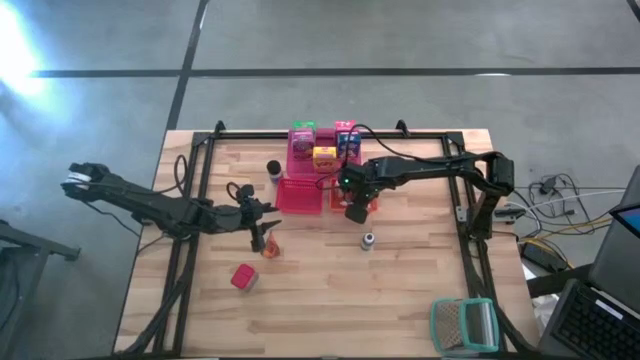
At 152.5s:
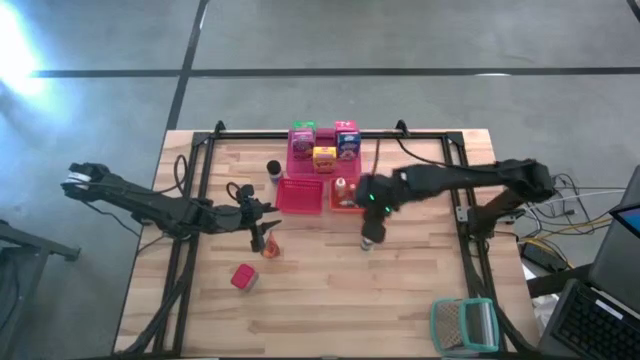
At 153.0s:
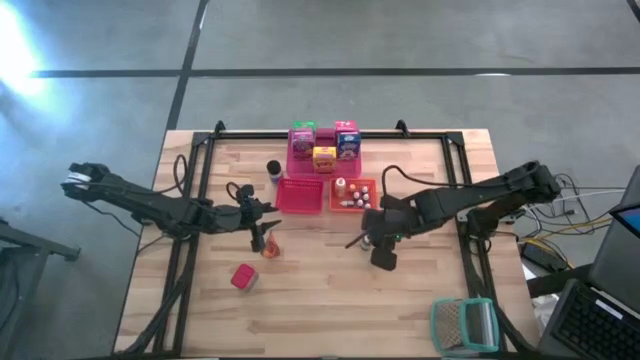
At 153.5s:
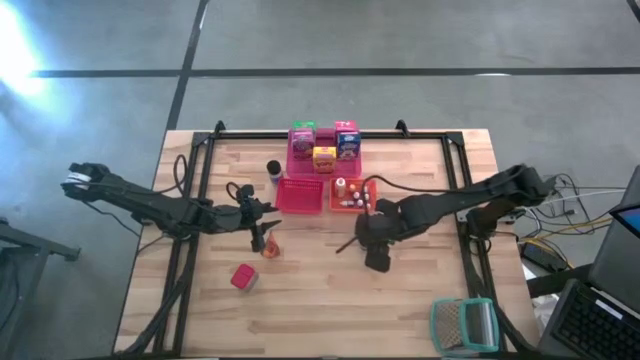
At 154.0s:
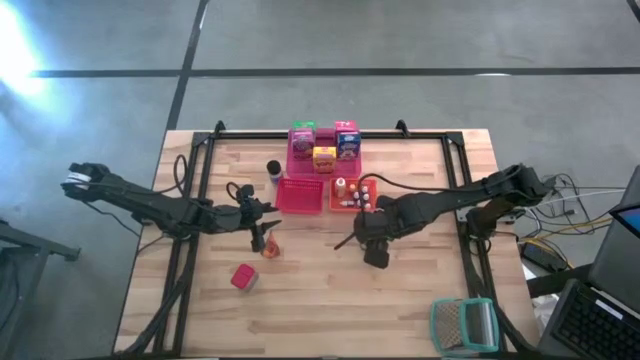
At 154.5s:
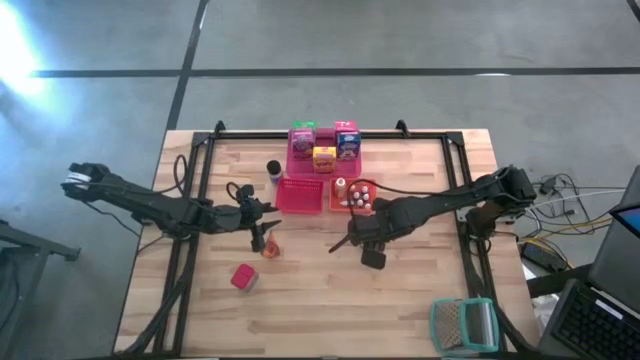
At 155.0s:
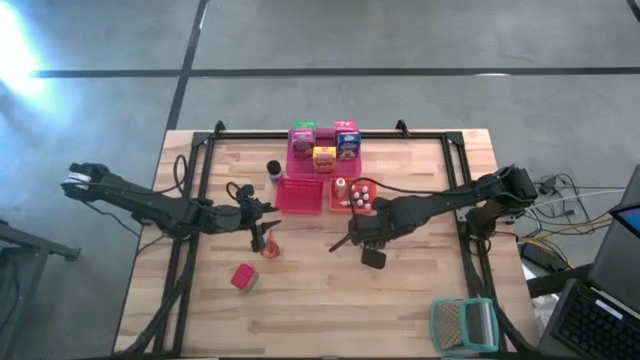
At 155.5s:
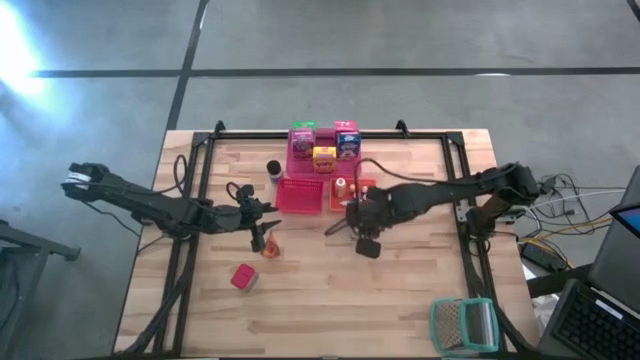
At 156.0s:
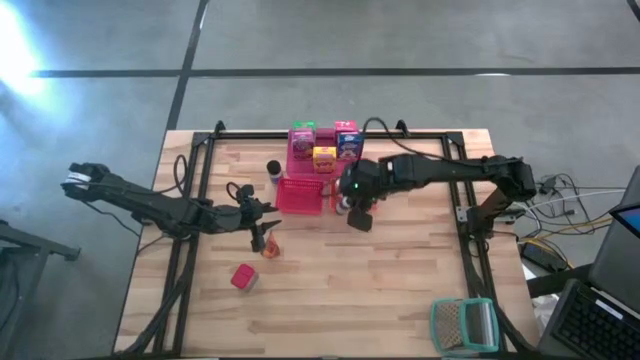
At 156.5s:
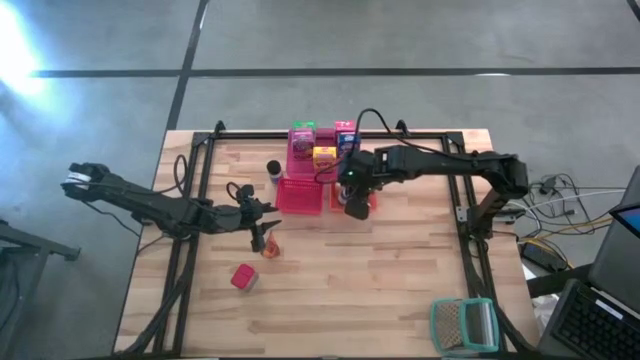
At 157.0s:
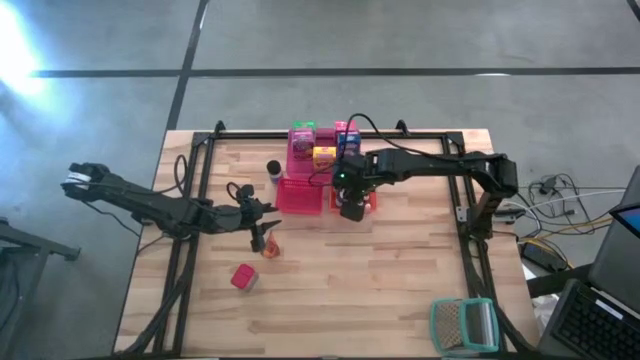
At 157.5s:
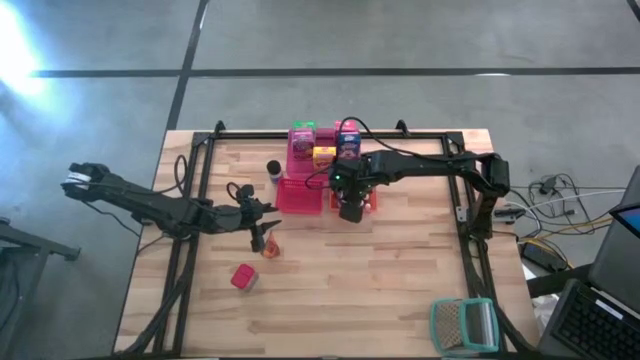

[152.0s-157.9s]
Task: Pick & Place Kitchen Items
Put the large black food coloring bottle into the orange bin

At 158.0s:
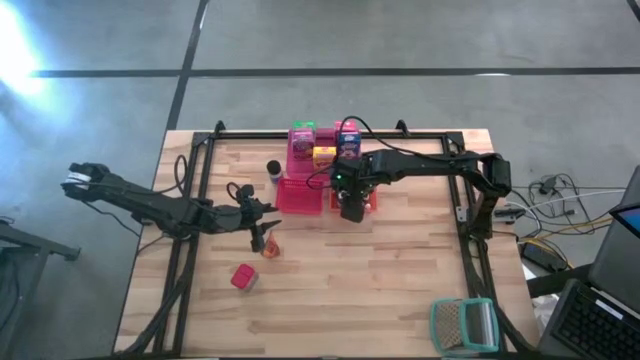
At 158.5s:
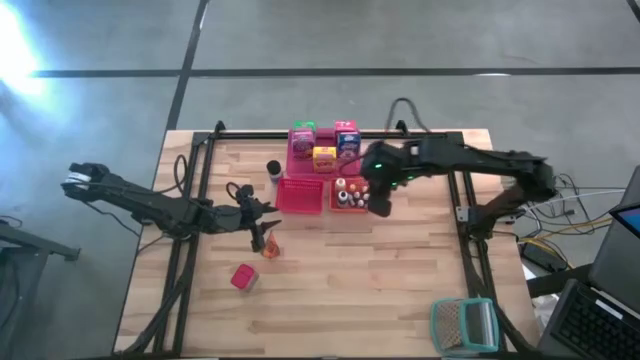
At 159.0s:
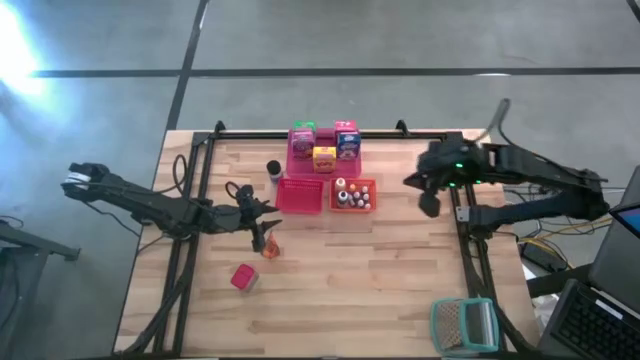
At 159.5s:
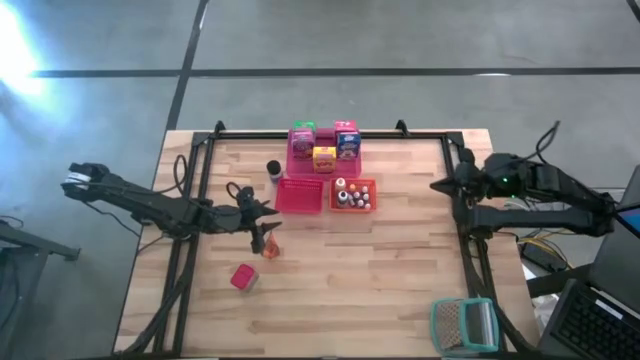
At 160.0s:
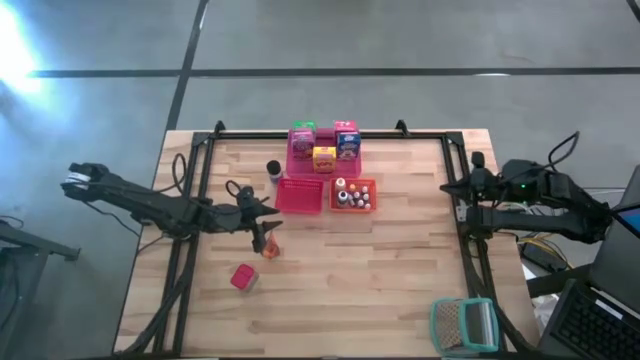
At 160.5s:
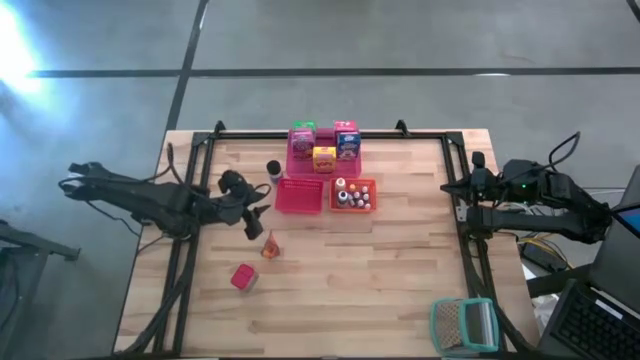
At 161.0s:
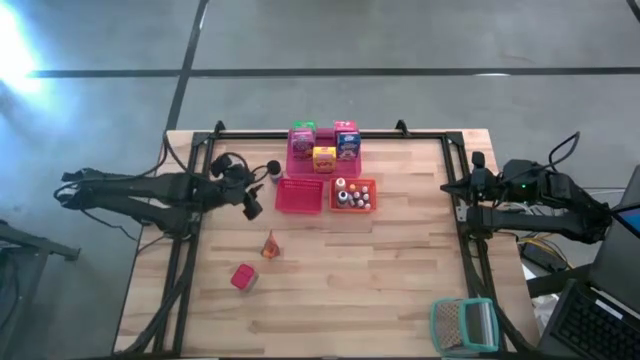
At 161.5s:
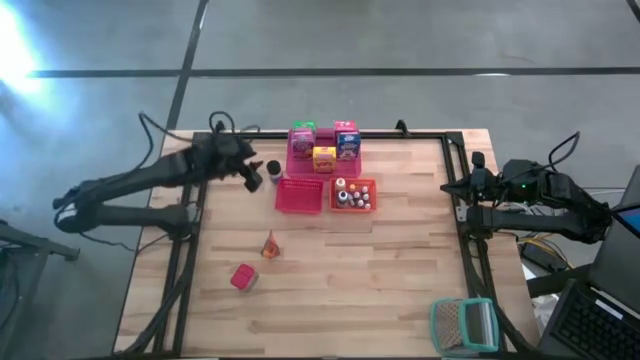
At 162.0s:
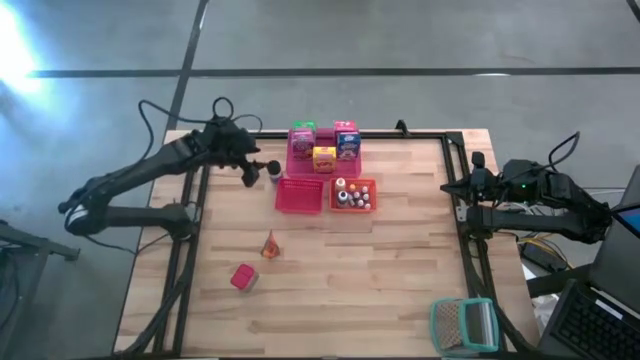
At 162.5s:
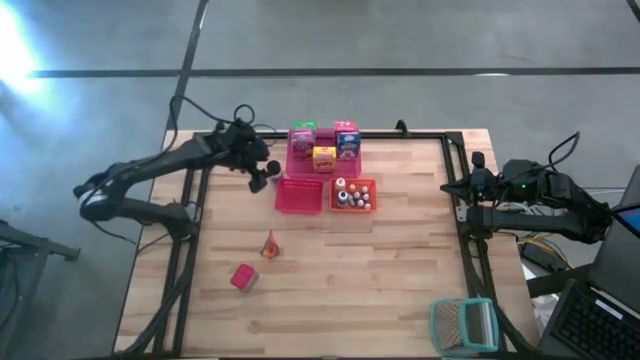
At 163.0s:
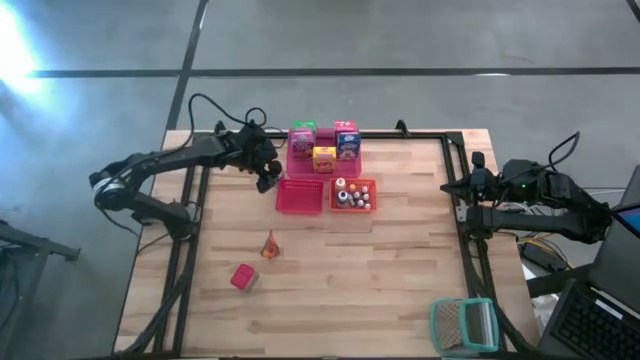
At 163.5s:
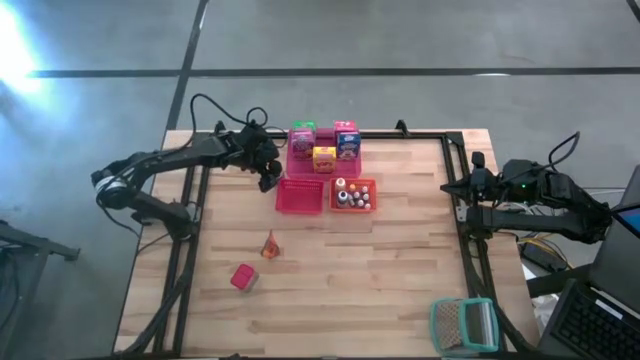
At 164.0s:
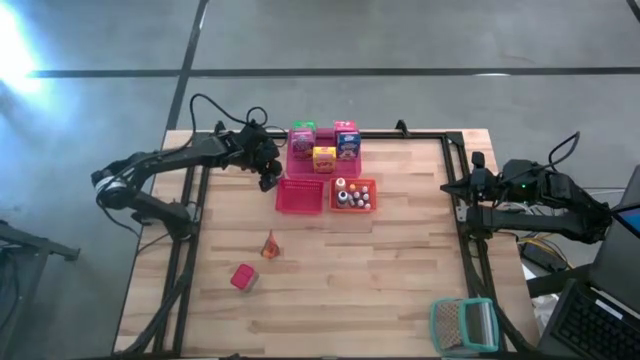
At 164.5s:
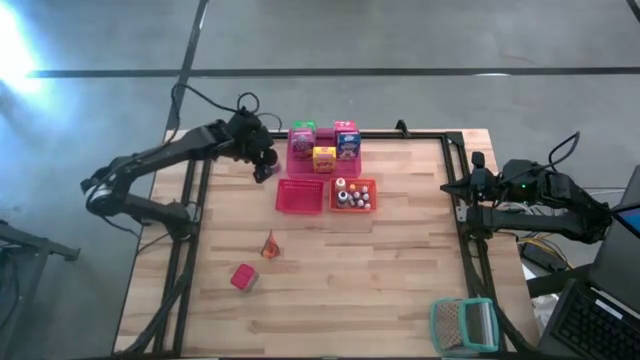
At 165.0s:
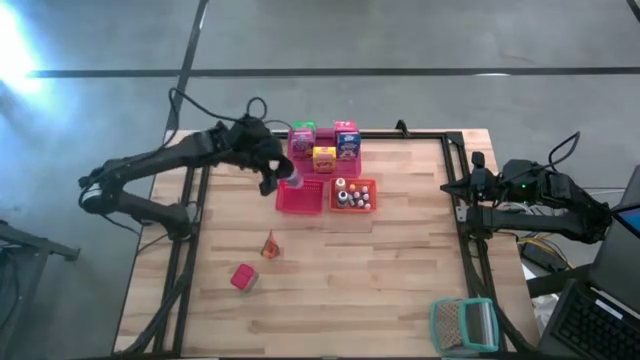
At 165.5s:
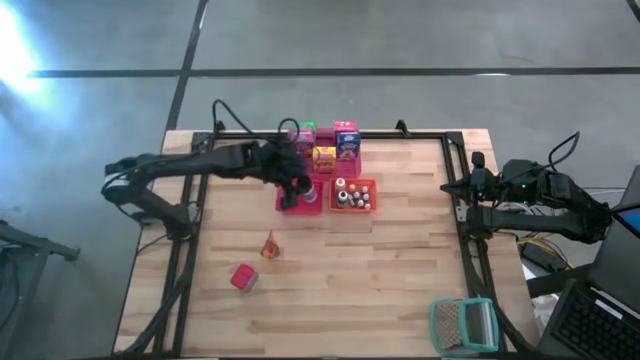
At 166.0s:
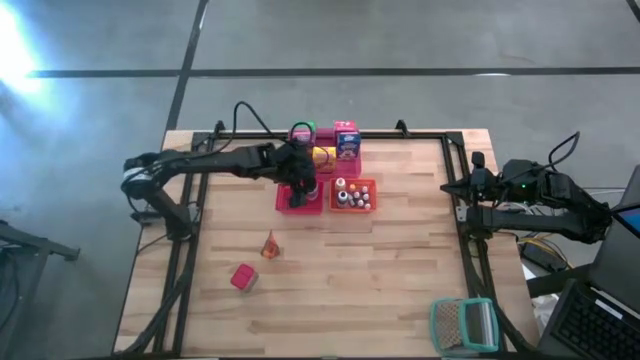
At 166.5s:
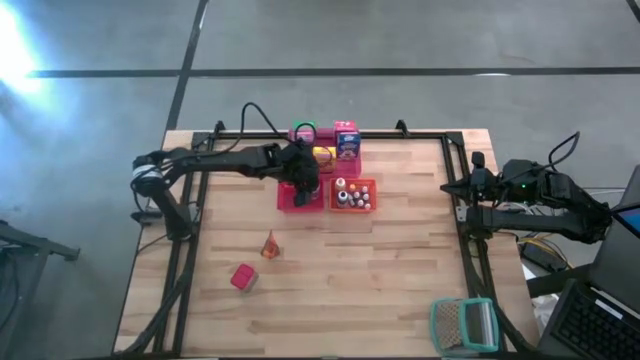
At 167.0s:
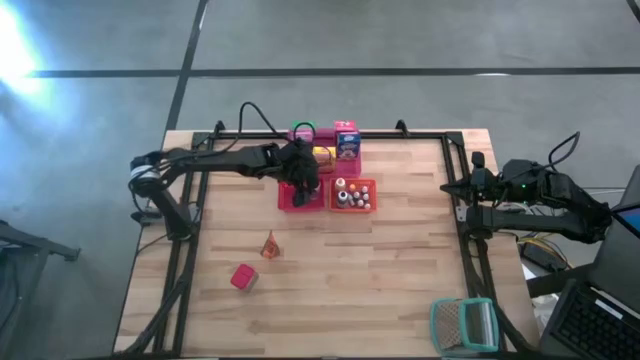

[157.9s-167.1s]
Put the black seasoning bottle into the red bin

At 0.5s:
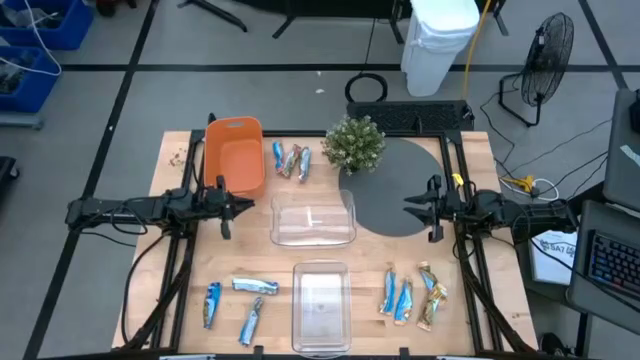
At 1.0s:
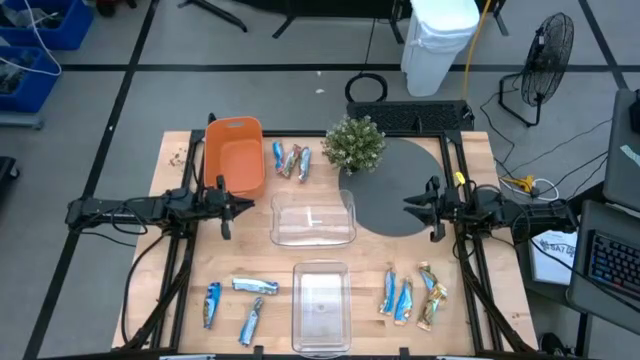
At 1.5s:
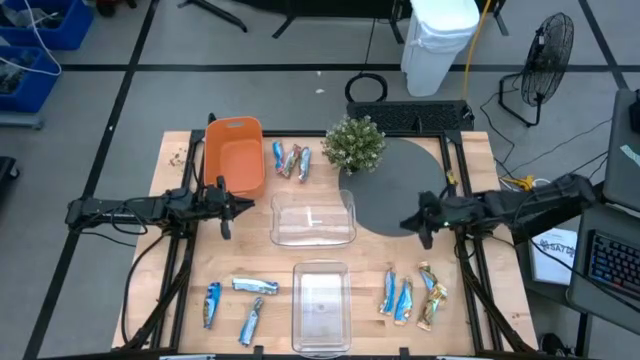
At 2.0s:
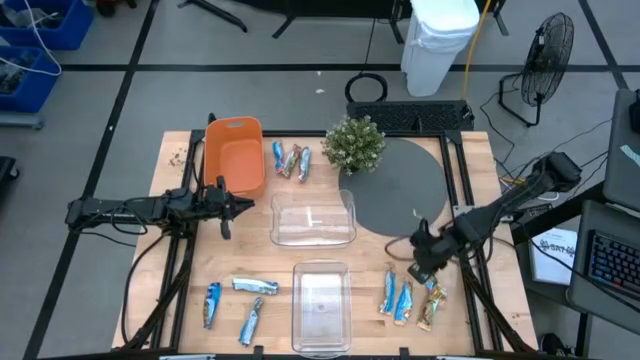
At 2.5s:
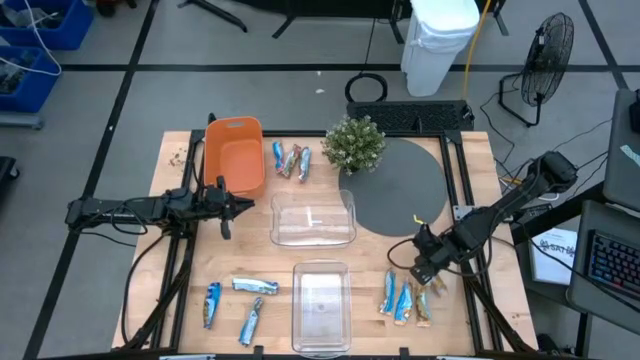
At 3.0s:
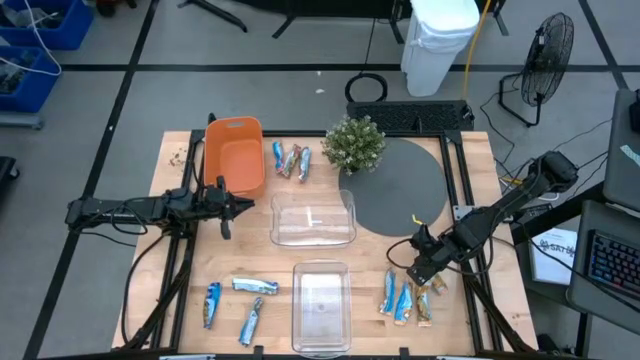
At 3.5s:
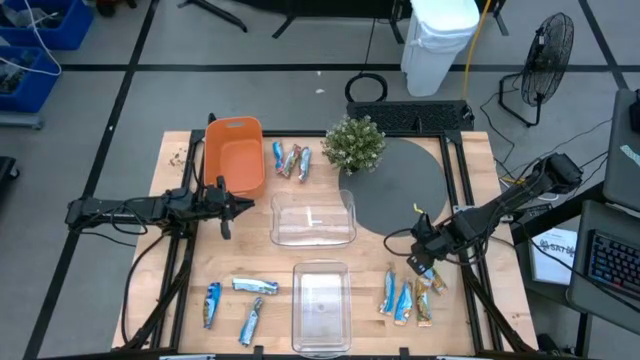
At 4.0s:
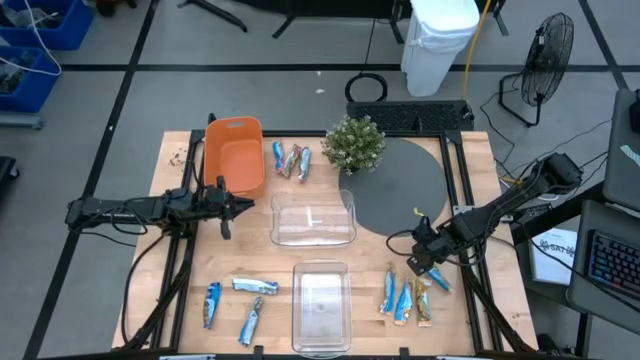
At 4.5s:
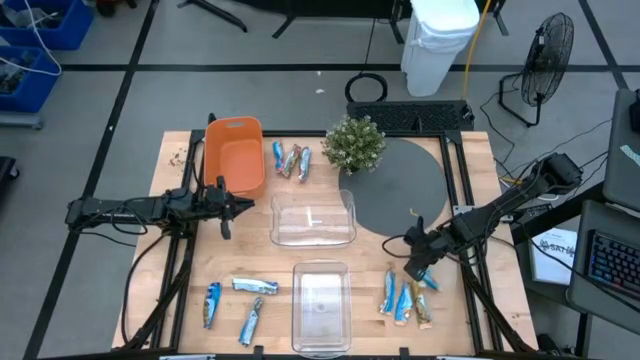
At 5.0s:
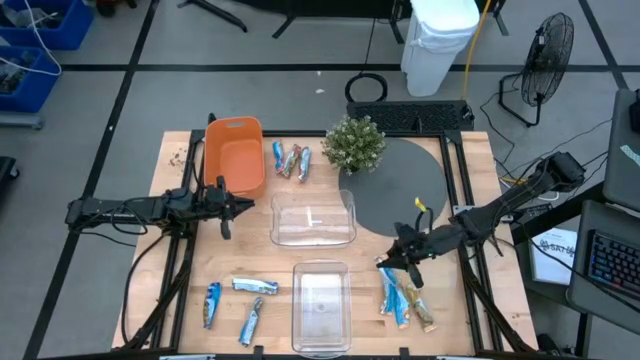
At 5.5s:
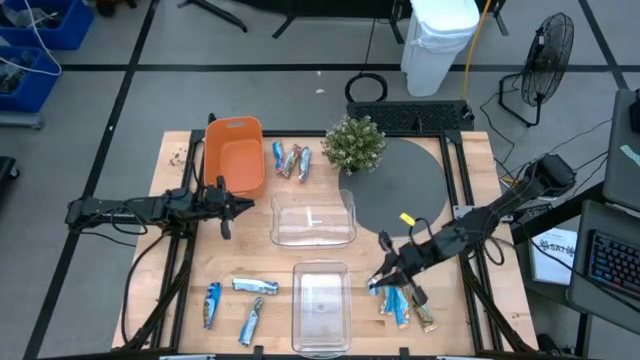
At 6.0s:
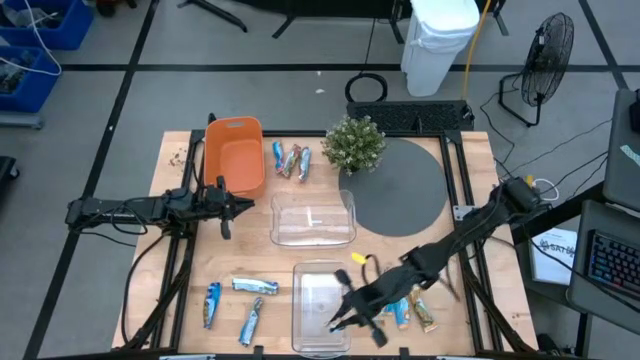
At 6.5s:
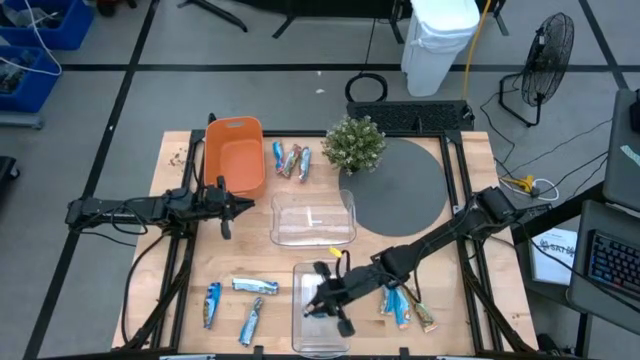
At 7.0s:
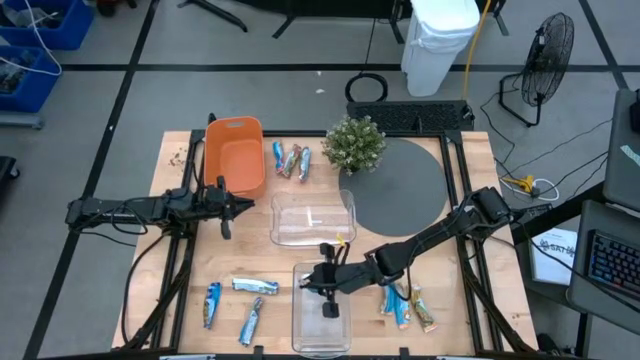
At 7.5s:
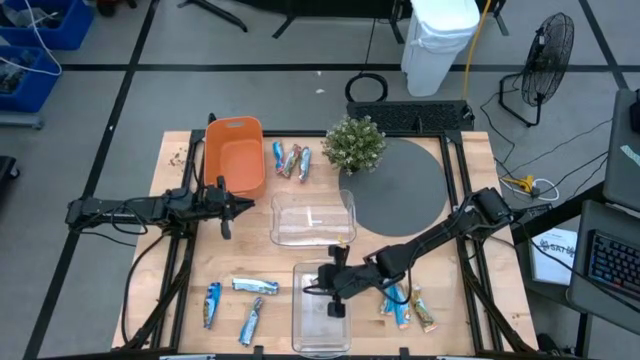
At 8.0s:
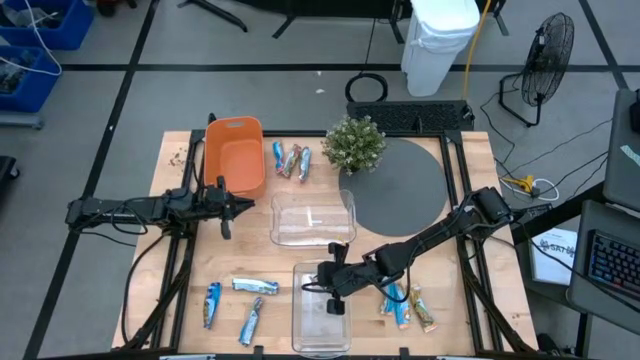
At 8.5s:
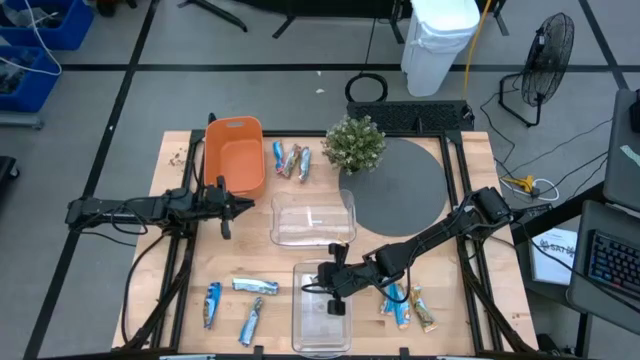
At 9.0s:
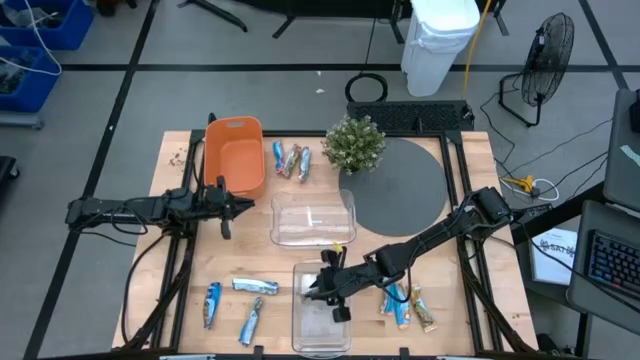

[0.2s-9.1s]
Task: Pick and place Granola Bars by type
Put the yellow granola bar into the bottom transparent bin
